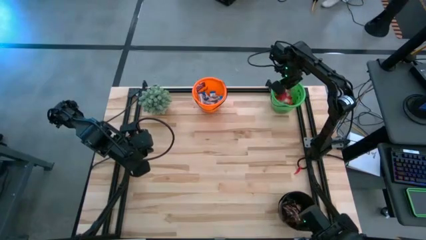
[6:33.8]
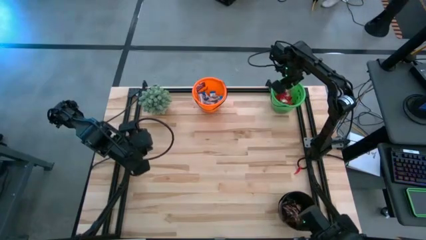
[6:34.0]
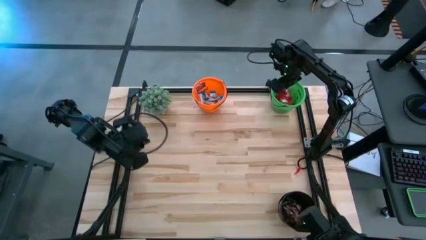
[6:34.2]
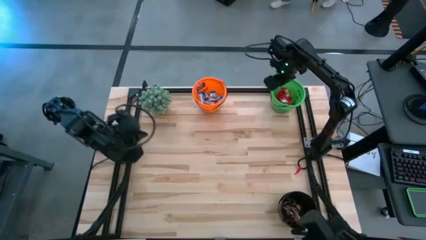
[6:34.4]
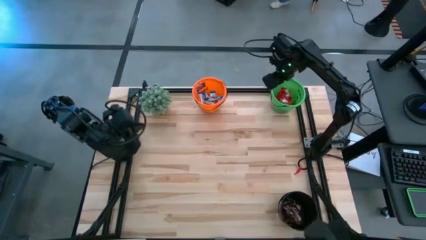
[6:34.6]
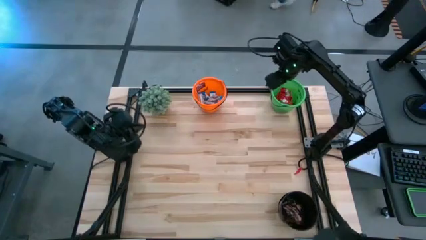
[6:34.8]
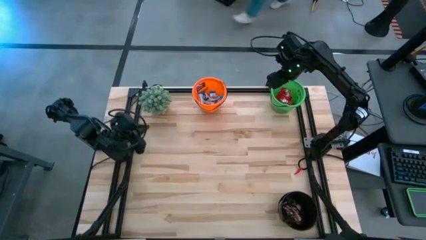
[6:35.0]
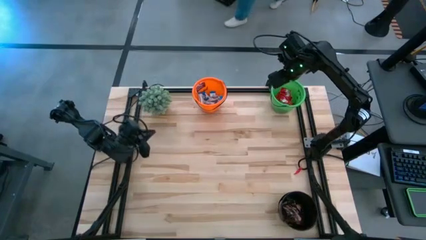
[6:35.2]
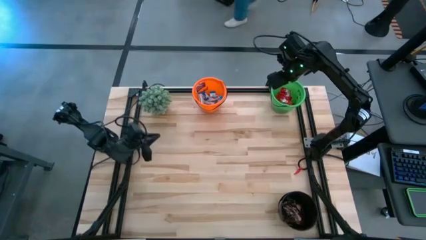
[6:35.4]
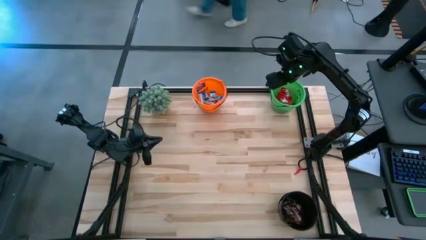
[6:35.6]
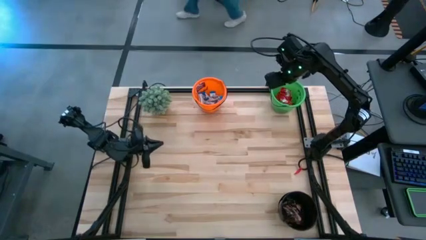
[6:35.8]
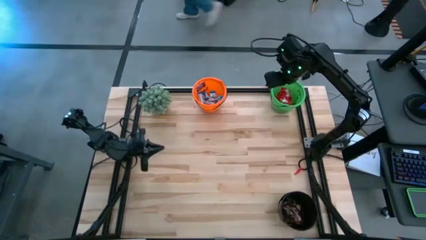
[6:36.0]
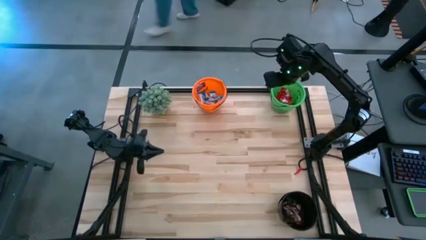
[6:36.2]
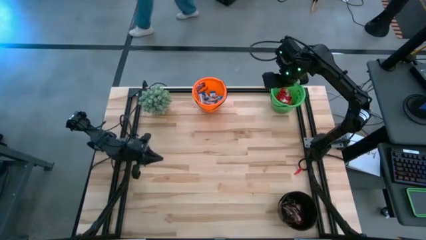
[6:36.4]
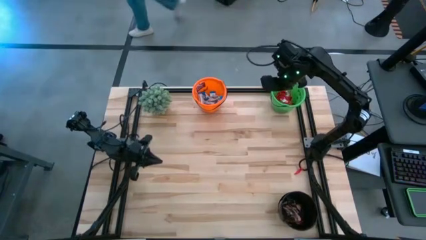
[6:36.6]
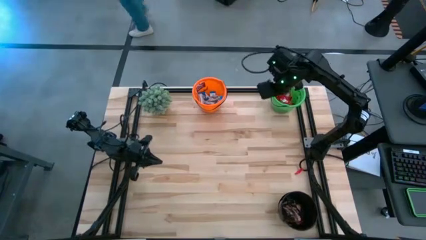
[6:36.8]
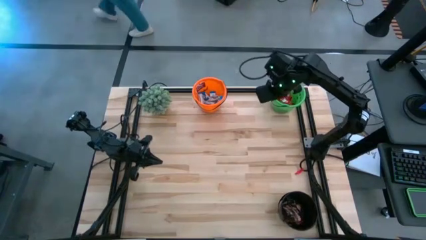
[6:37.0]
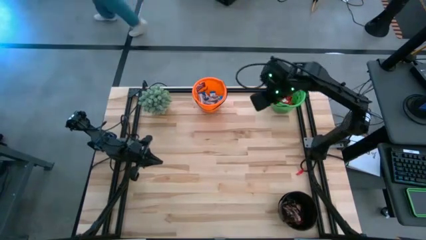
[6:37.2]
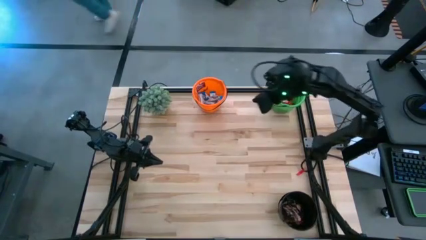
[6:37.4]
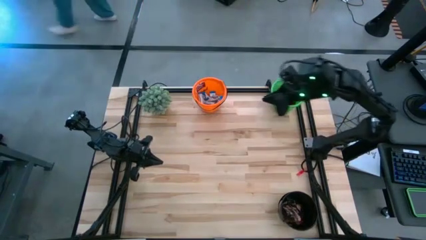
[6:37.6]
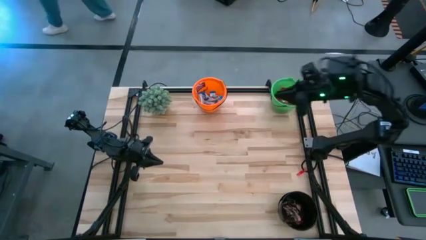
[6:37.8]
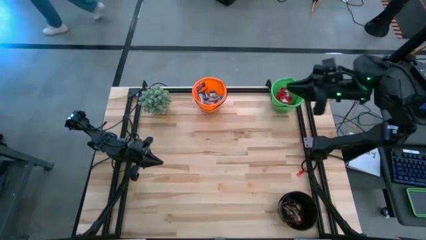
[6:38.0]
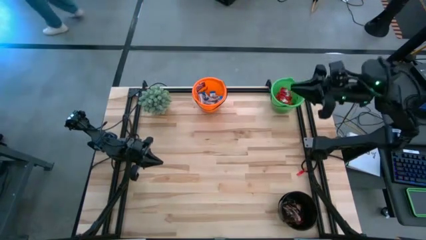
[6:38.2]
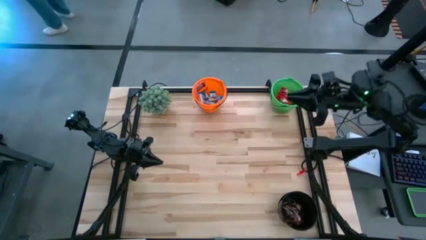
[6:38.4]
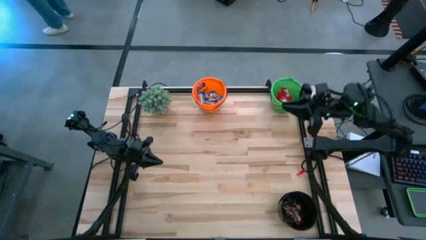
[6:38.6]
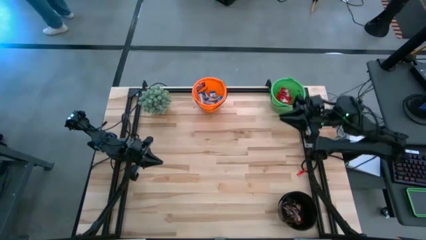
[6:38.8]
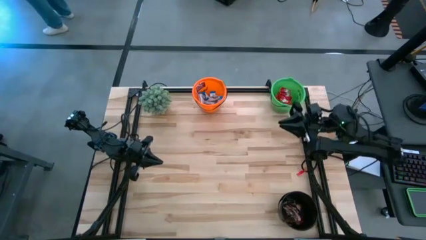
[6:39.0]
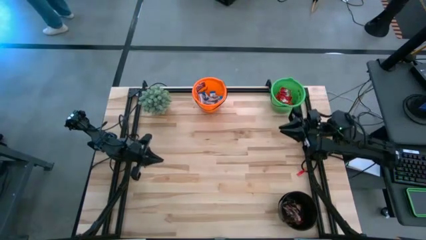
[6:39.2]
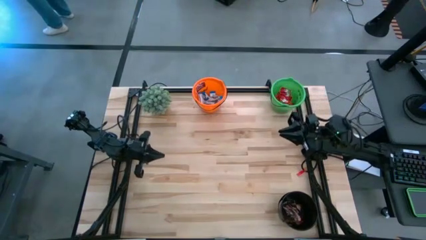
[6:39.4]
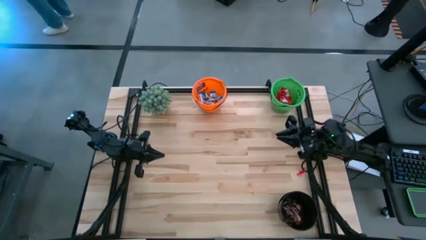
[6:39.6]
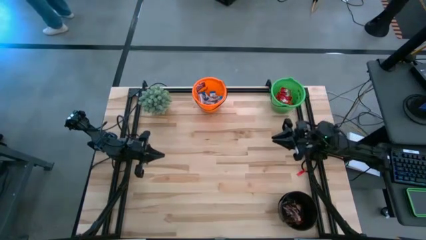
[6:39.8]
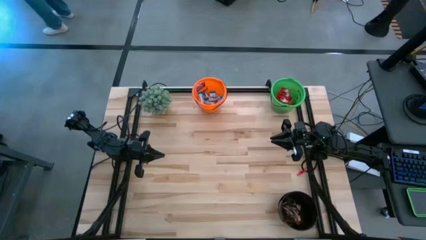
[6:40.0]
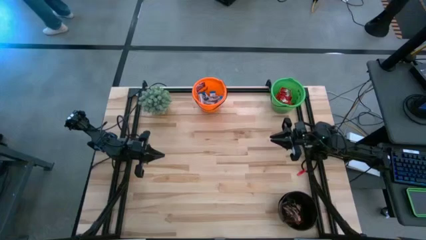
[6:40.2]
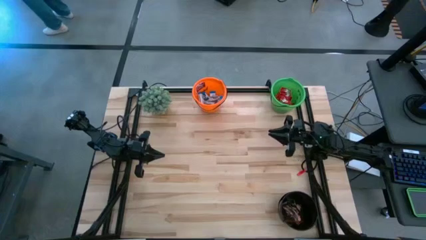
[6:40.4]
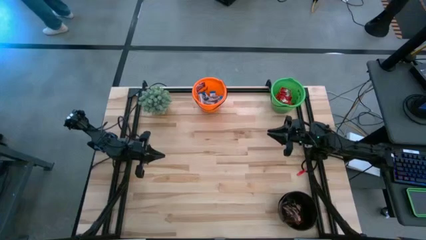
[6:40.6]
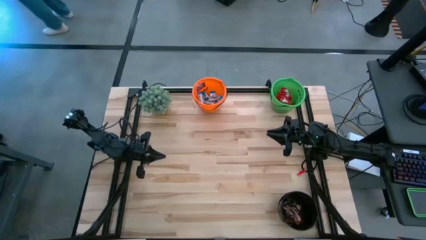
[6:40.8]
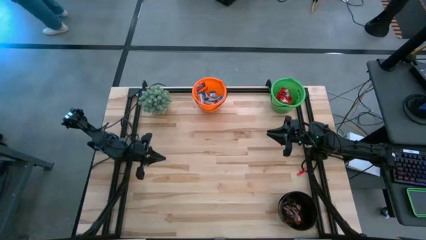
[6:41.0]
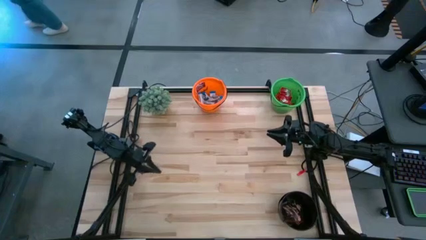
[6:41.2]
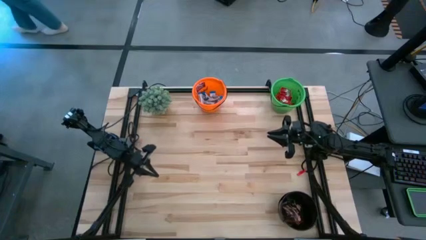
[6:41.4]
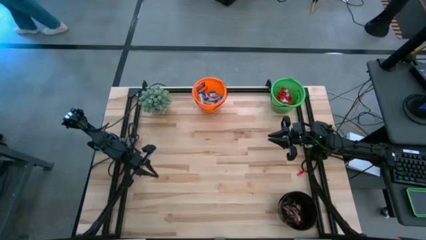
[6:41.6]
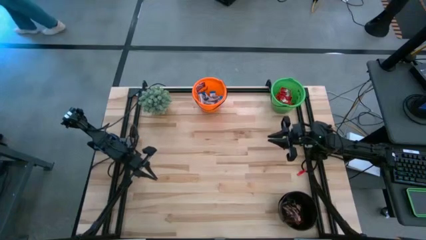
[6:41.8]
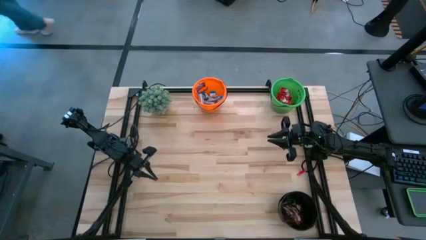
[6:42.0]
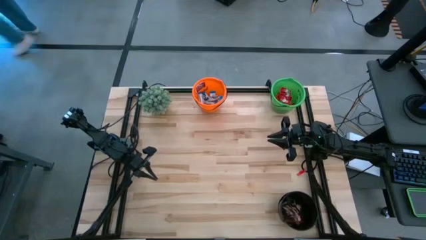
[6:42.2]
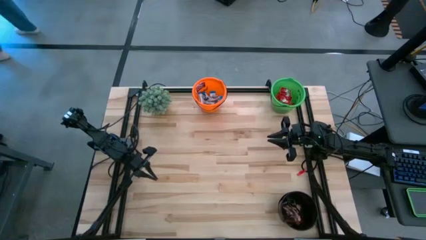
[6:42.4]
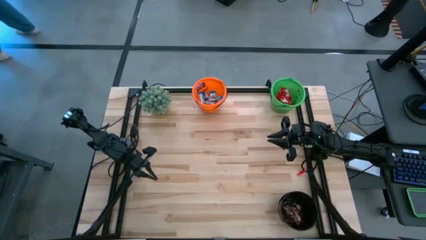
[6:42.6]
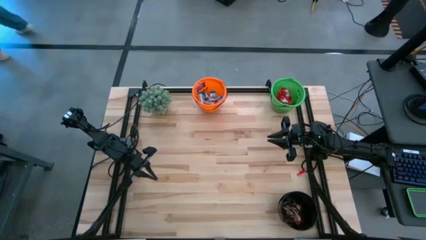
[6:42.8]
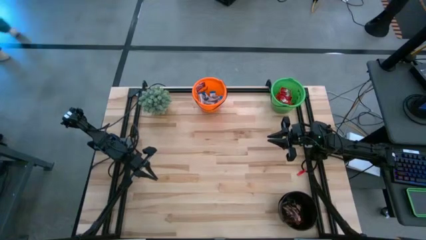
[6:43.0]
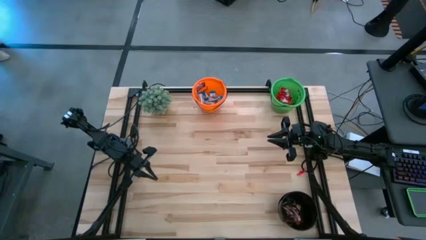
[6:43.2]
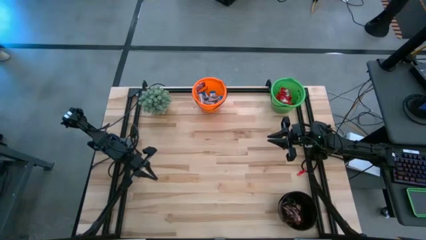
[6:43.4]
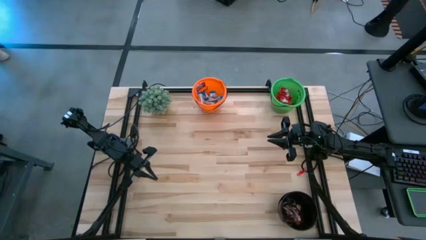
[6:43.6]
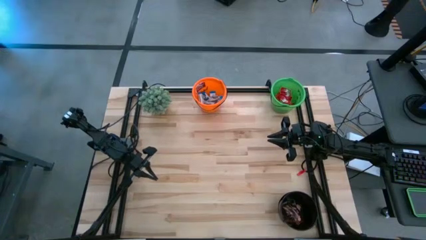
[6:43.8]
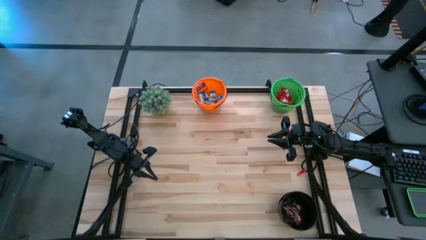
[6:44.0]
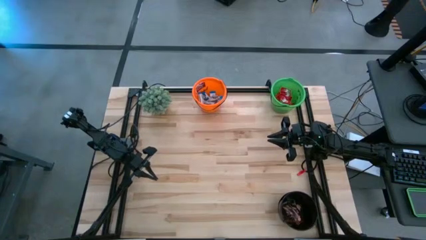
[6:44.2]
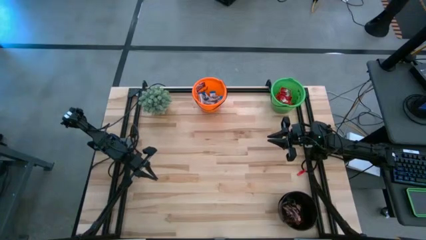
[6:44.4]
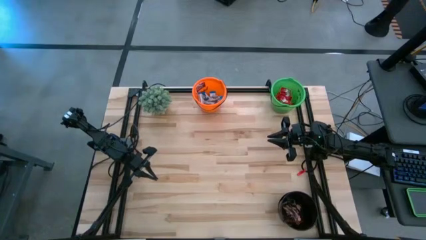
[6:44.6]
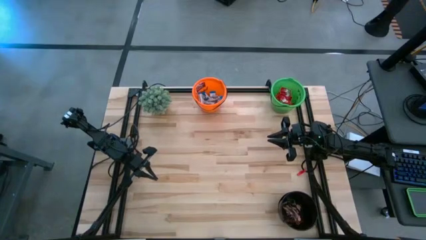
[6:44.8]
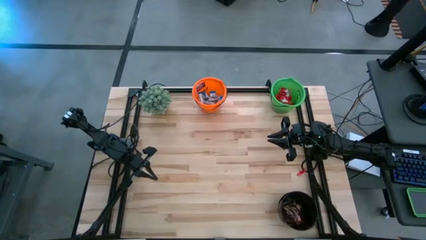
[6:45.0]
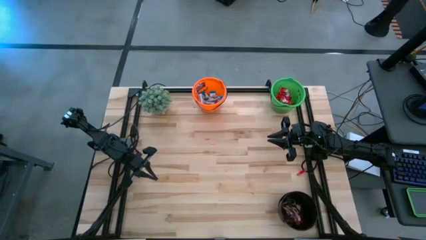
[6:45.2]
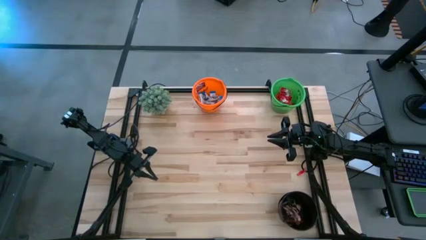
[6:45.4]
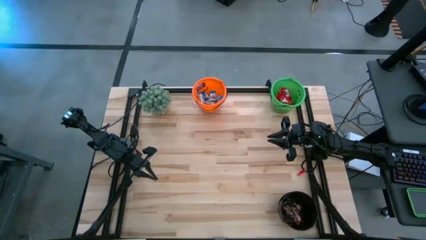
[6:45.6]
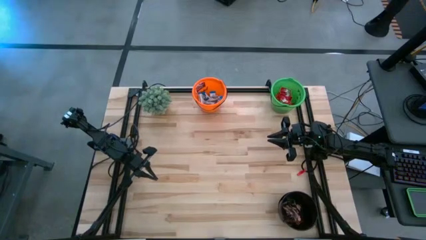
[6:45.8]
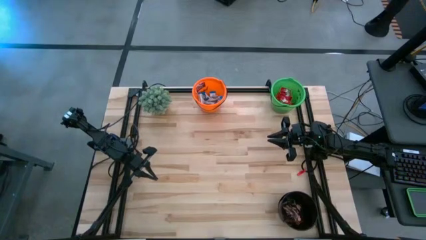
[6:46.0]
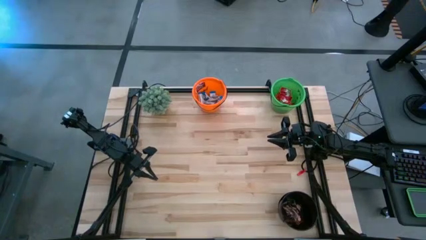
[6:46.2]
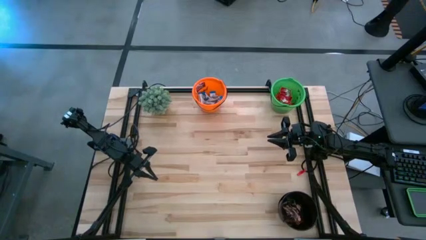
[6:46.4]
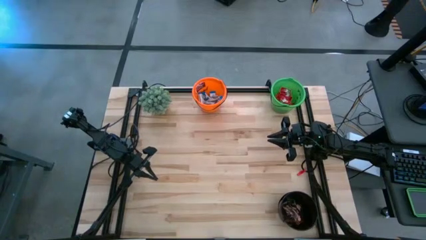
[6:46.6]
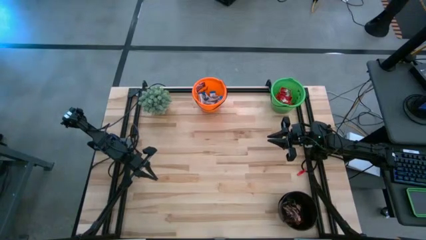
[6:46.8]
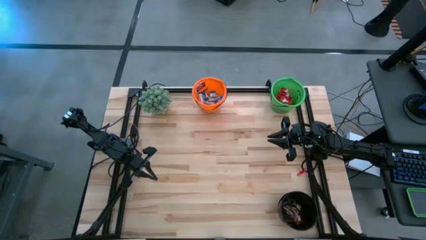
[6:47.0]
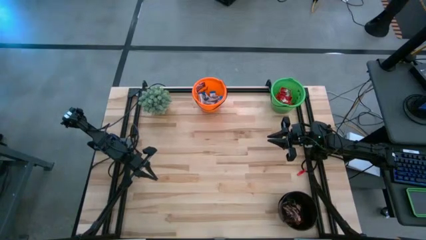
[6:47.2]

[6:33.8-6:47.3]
Task: Organize candy in baskets
Return to Home Position
